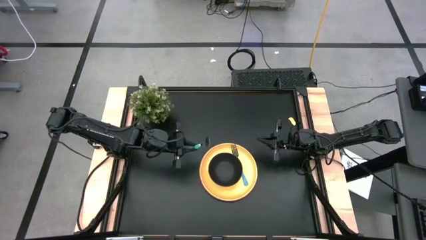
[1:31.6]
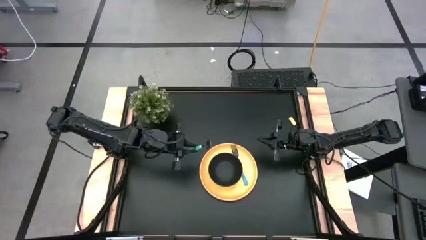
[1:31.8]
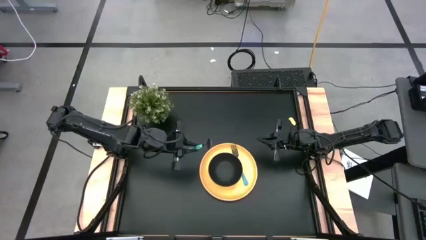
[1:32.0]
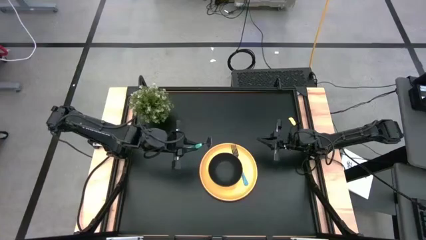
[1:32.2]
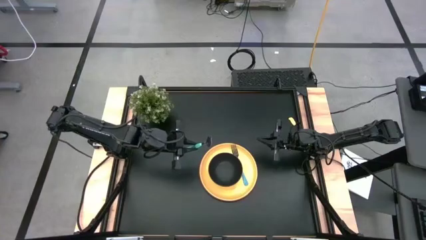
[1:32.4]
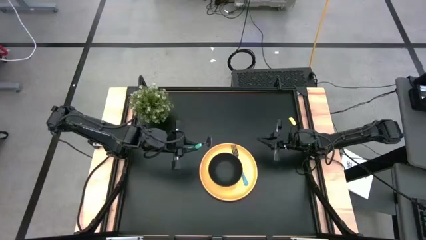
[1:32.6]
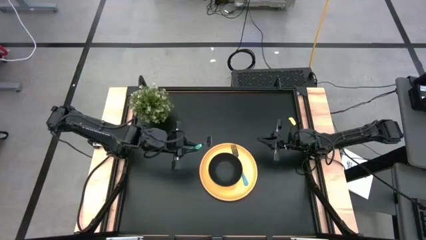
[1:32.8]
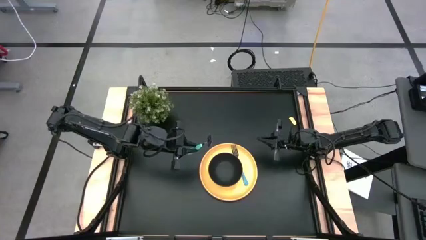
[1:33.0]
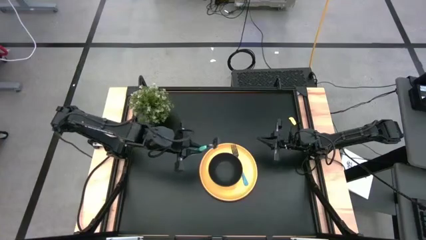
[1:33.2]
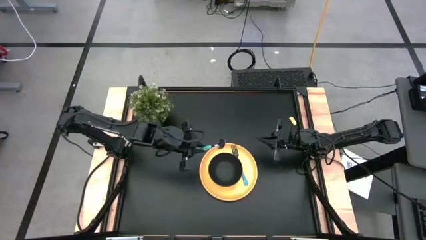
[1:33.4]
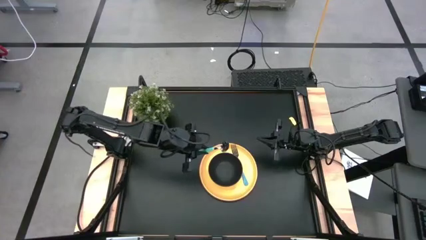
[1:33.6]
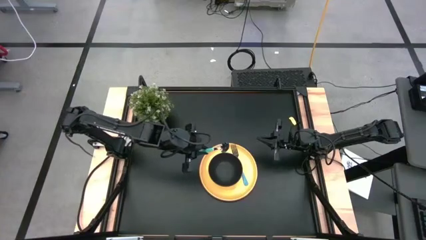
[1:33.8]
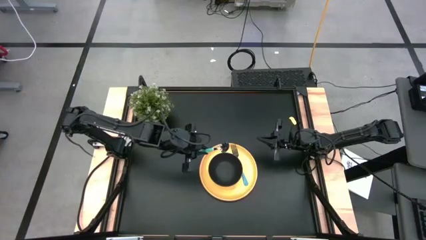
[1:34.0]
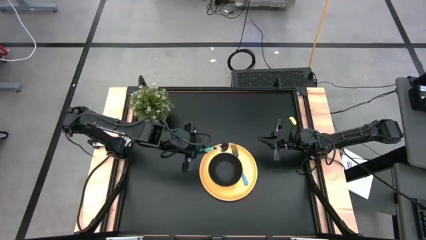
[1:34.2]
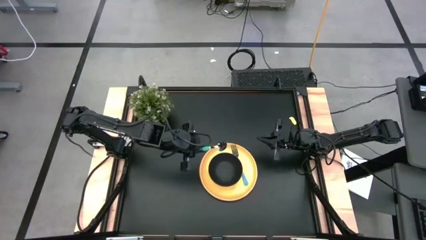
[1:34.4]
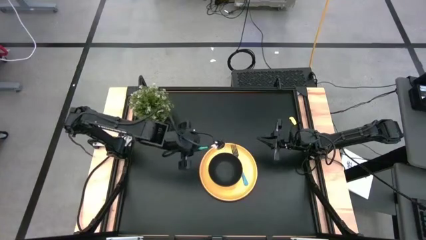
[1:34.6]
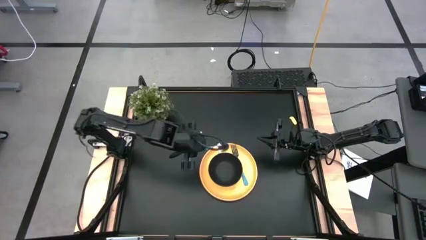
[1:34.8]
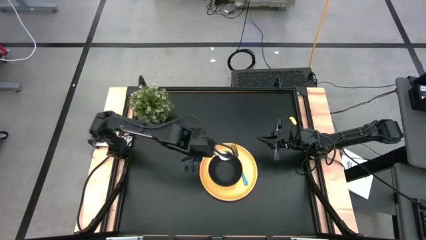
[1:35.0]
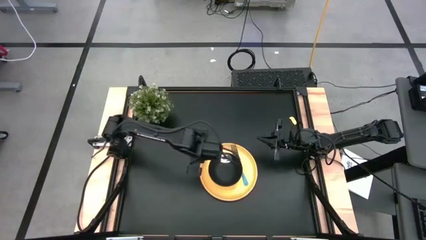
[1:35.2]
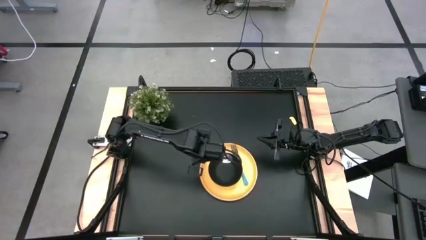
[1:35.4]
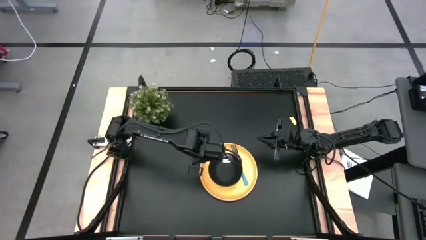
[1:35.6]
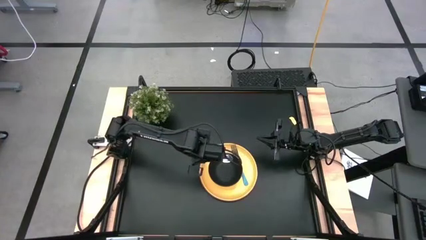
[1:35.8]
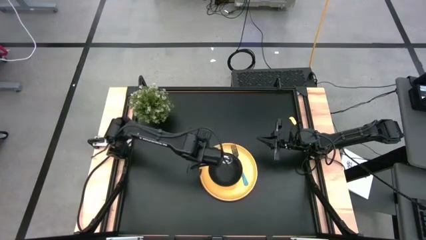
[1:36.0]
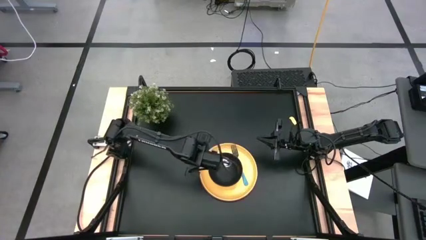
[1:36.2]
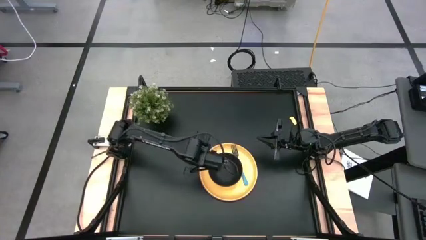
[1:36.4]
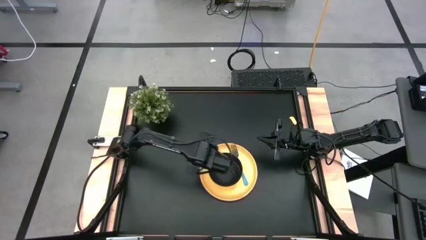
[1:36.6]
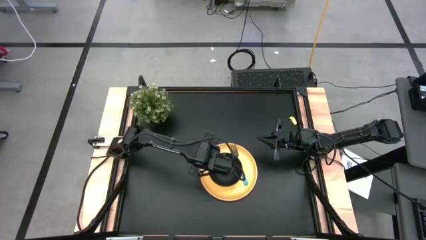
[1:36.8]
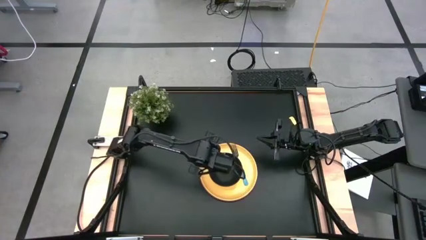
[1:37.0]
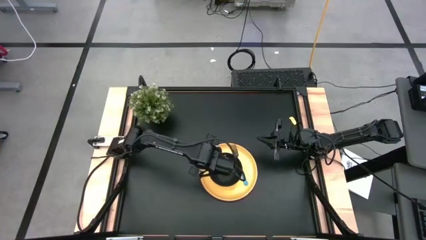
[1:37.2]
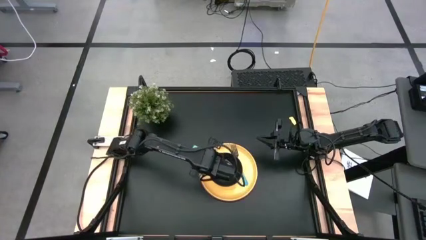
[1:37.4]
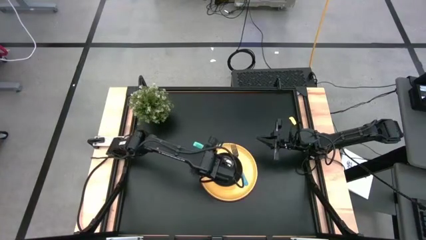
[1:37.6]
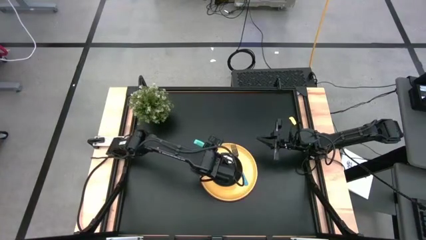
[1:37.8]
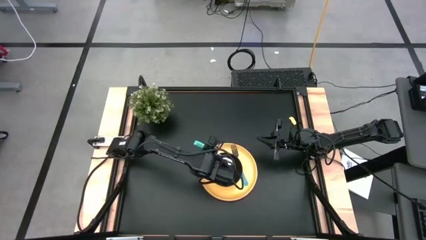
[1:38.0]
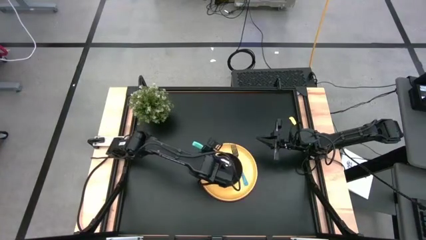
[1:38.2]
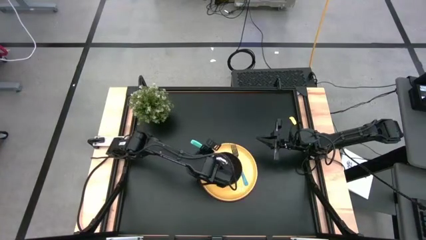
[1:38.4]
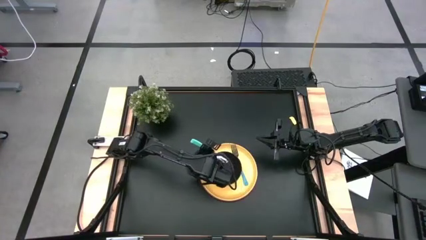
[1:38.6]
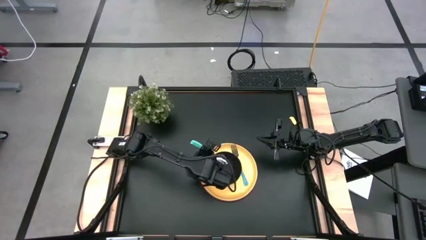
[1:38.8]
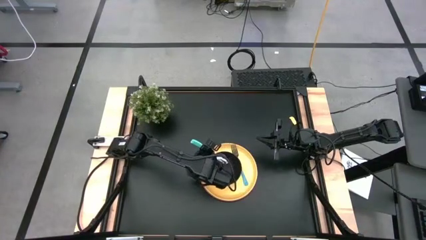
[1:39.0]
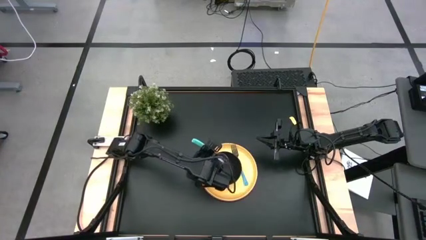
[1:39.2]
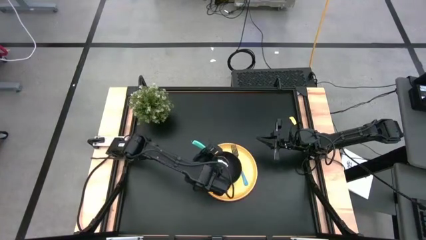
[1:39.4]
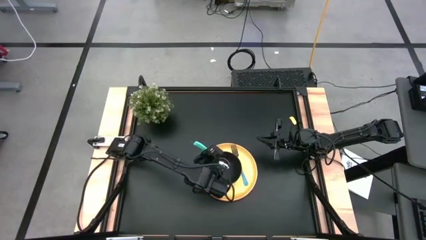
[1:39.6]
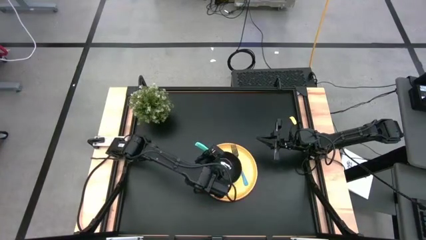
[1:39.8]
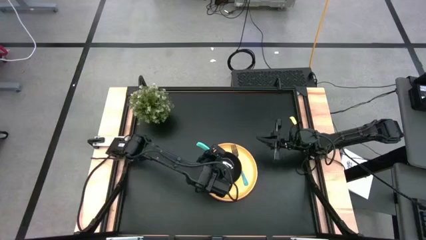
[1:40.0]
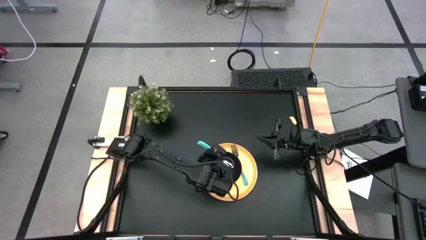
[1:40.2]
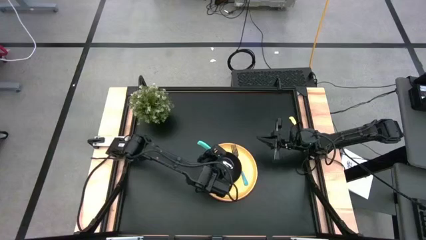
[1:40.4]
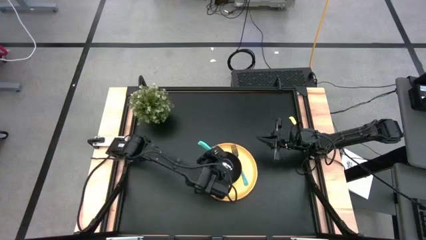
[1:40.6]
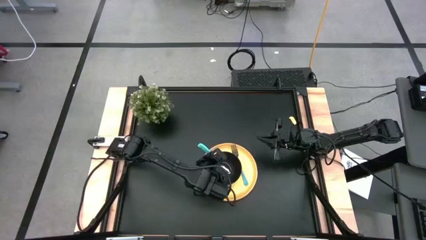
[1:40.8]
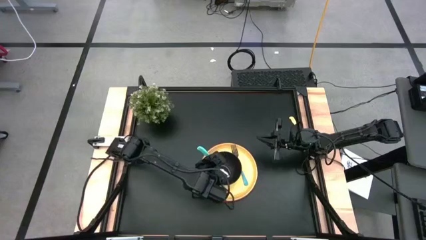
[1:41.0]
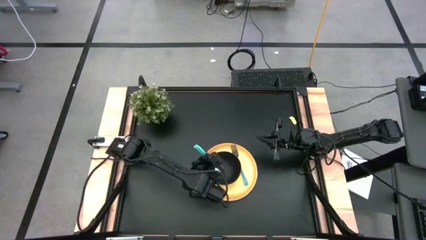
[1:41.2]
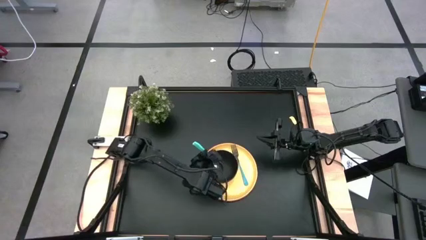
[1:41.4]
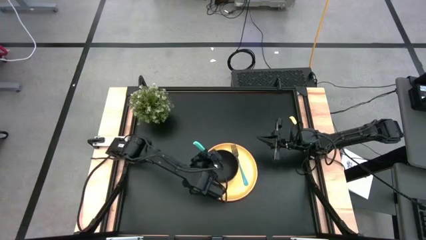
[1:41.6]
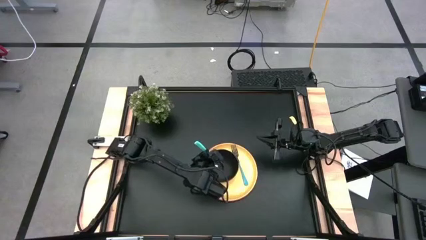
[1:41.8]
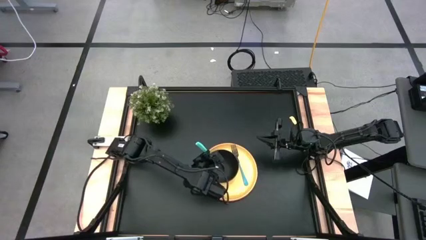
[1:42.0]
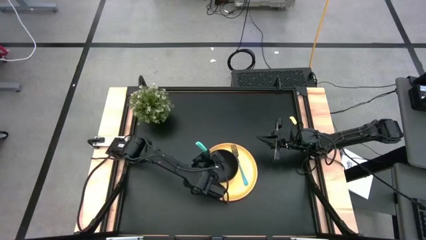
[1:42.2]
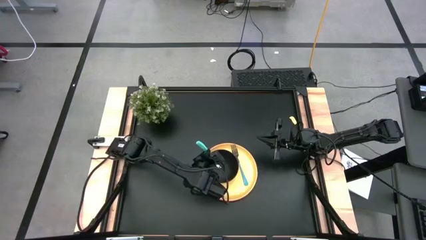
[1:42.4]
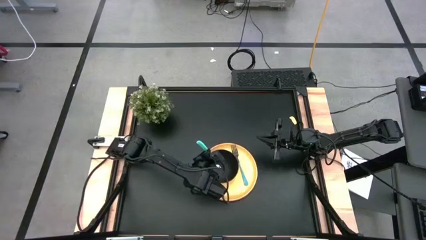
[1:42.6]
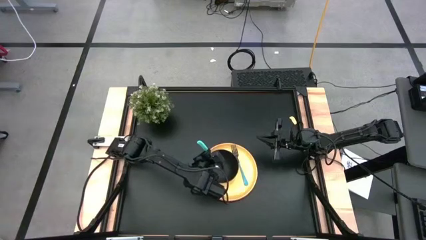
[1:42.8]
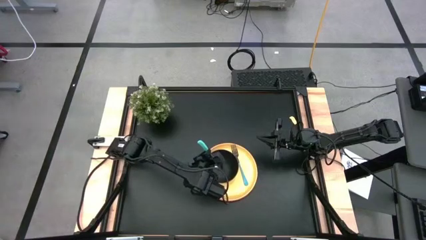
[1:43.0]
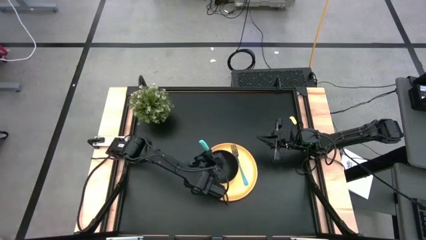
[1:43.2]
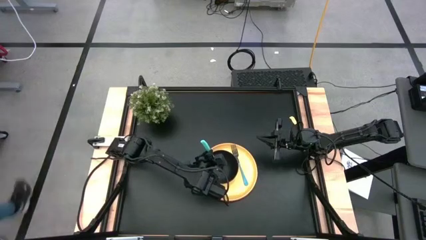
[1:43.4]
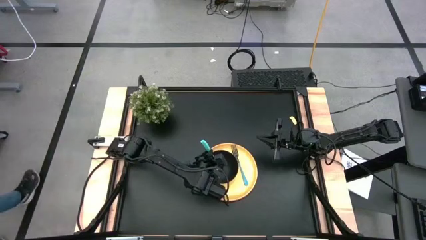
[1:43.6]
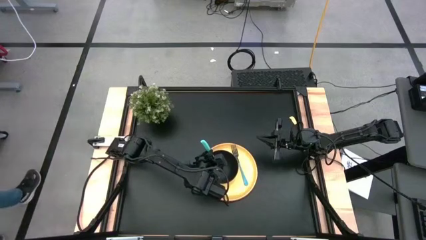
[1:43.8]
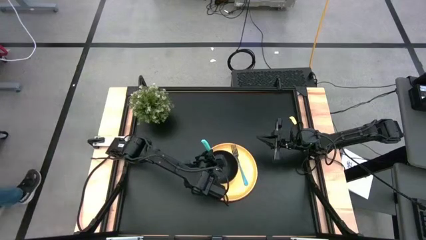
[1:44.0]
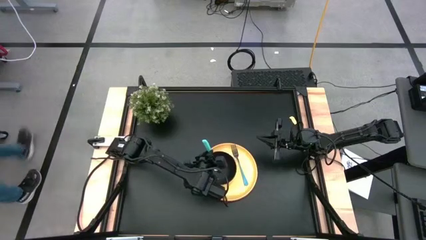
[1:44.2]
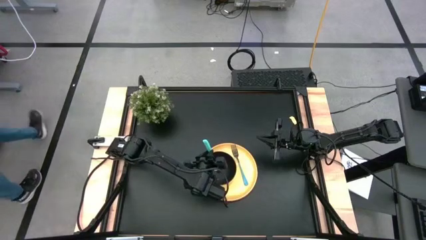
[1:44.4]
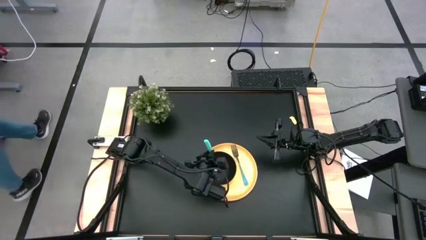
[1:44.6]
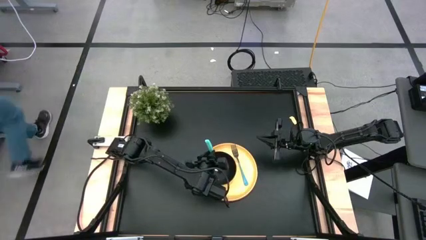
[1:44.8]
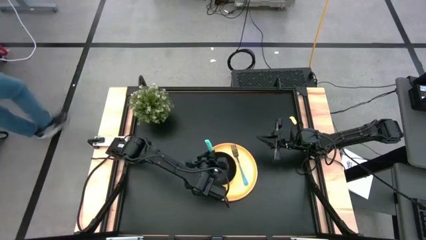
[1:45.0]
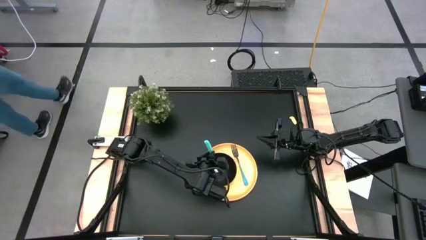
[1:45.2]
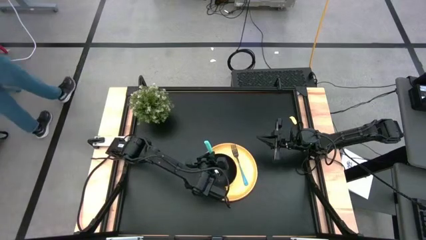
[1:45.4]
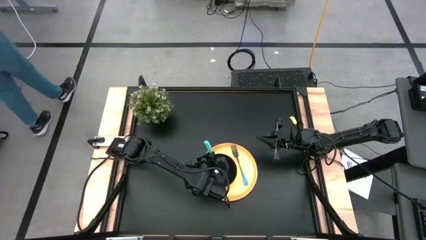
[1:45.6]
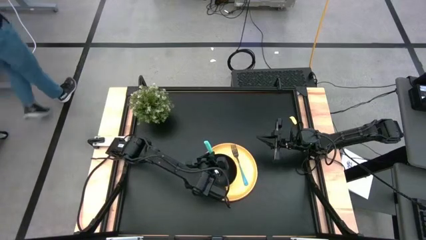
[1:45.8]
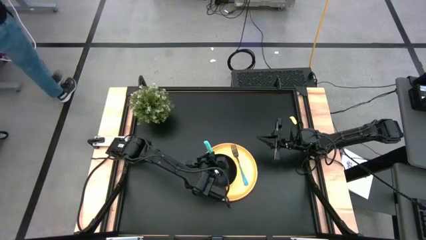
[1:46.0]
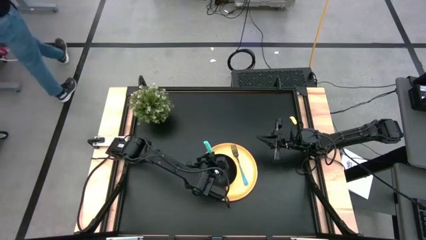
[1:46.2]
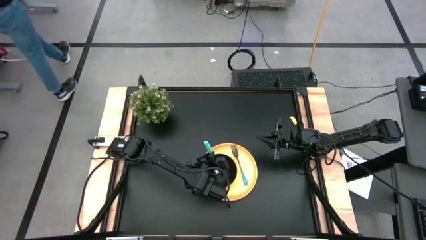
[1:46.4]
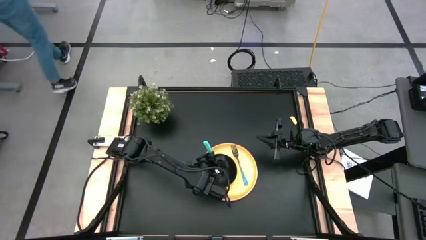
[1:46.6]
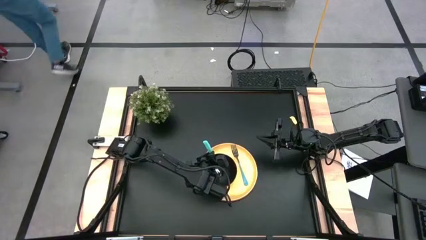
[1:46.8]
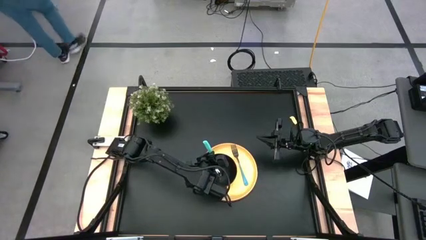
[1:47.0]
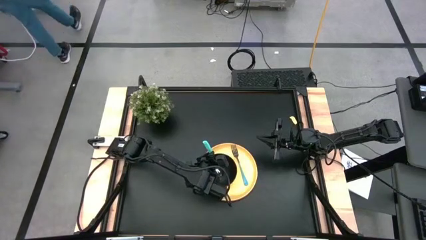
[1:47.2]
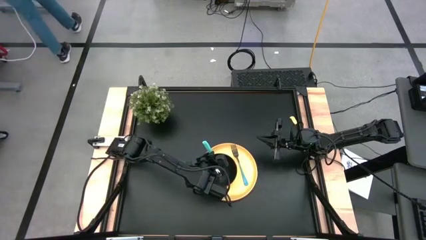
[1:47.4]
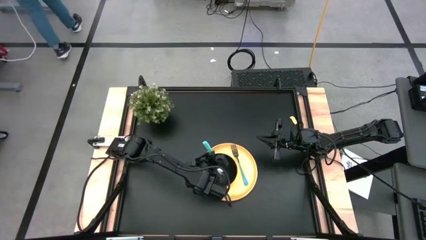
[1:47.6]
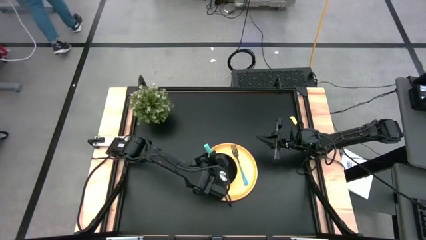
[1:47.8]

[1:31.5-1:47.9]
Task: Set table place
Put the blue spoon on the black bowl
